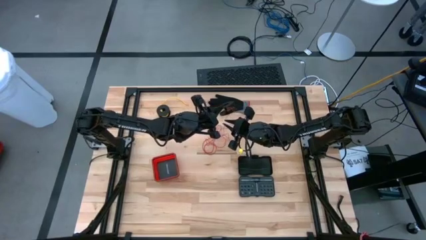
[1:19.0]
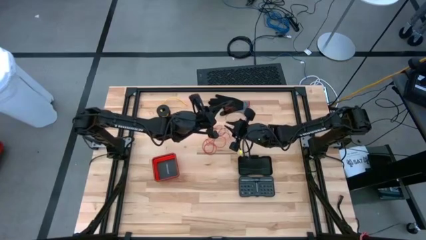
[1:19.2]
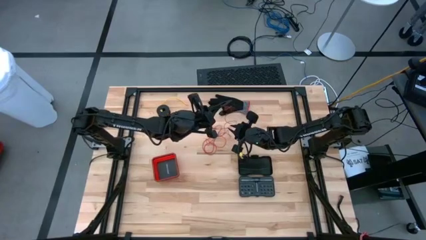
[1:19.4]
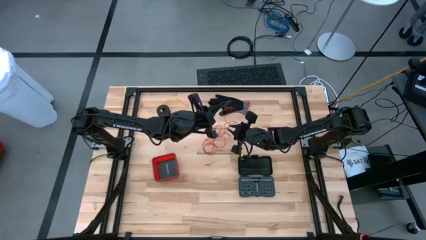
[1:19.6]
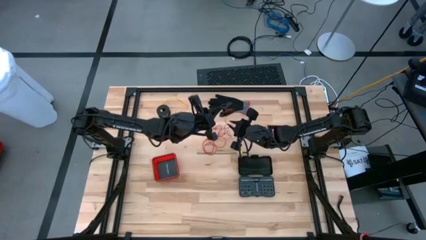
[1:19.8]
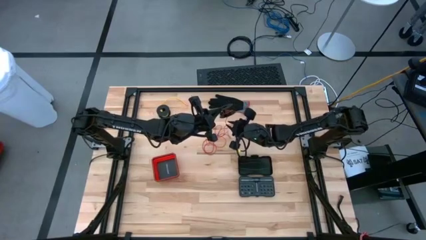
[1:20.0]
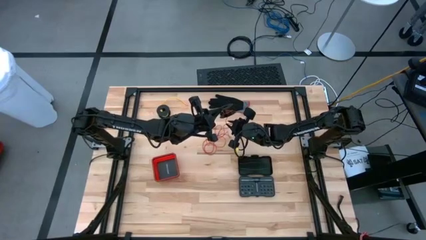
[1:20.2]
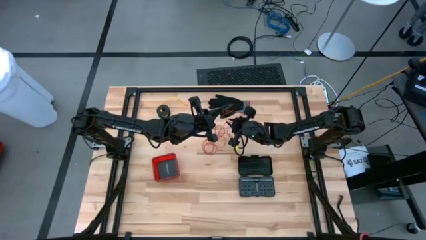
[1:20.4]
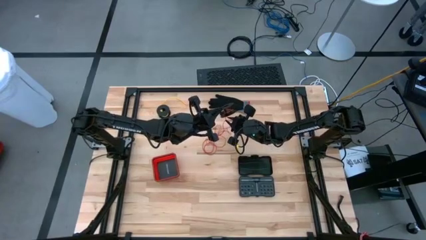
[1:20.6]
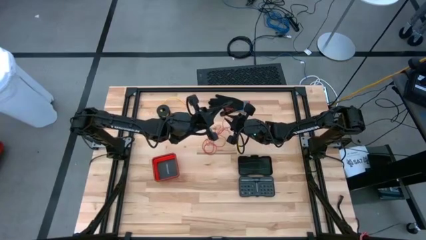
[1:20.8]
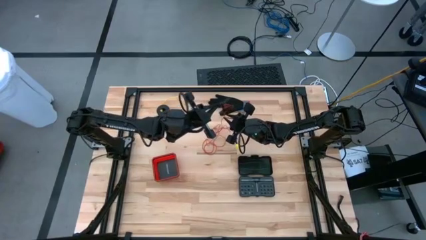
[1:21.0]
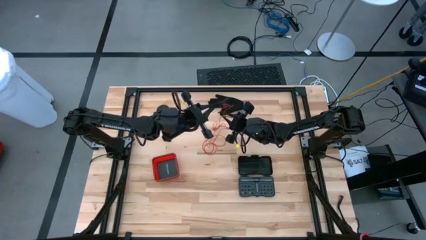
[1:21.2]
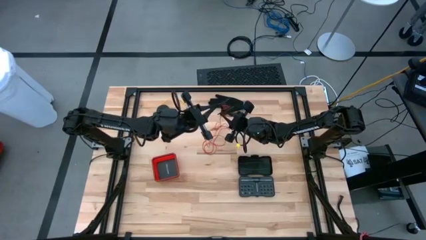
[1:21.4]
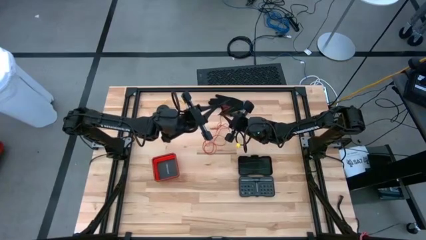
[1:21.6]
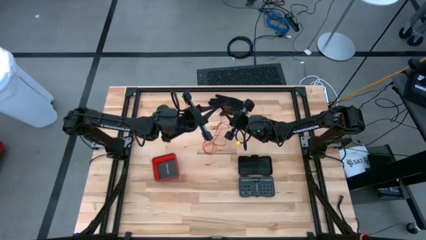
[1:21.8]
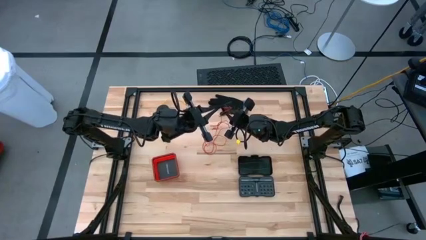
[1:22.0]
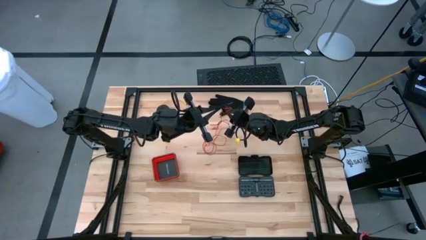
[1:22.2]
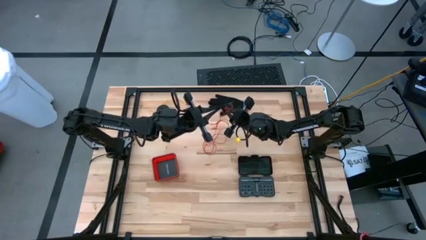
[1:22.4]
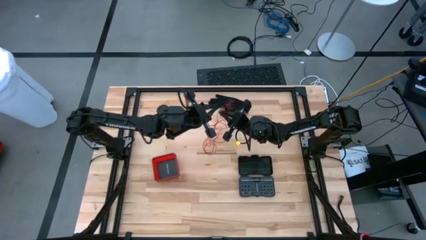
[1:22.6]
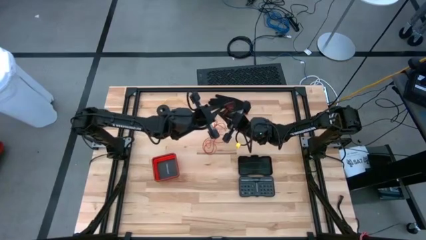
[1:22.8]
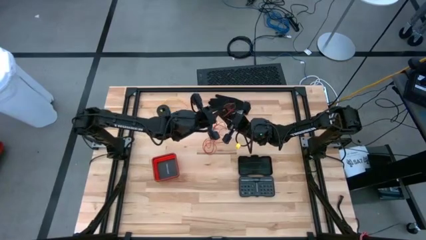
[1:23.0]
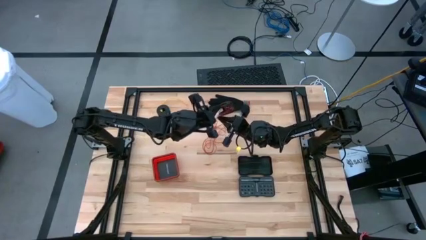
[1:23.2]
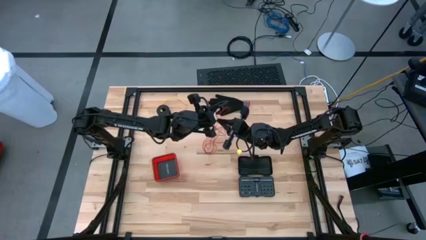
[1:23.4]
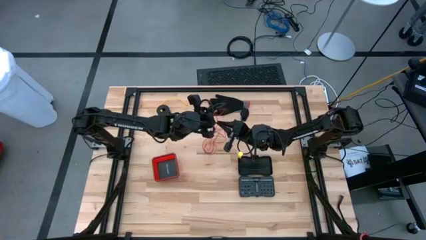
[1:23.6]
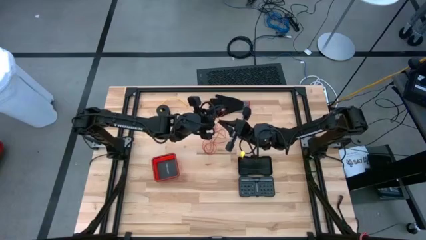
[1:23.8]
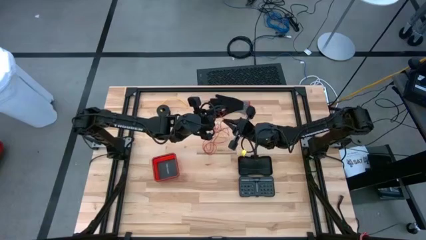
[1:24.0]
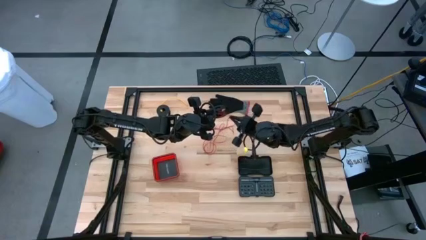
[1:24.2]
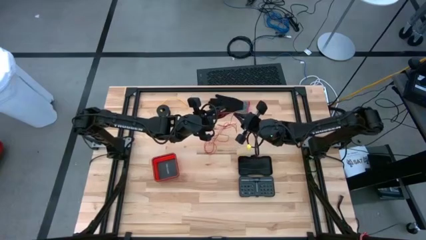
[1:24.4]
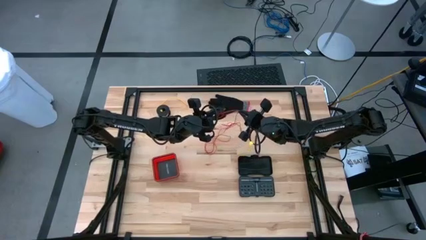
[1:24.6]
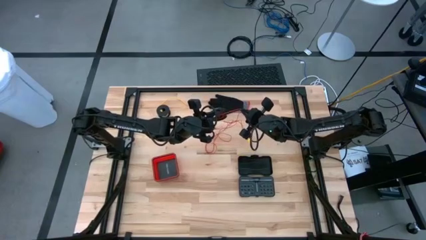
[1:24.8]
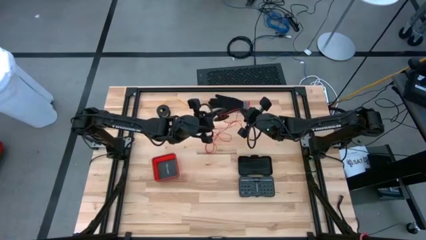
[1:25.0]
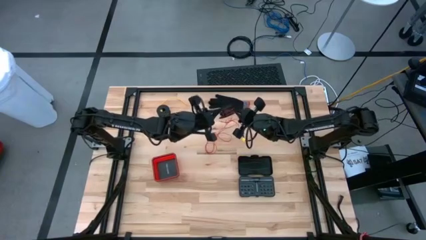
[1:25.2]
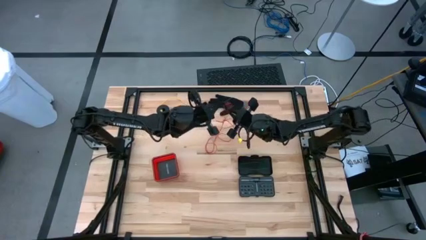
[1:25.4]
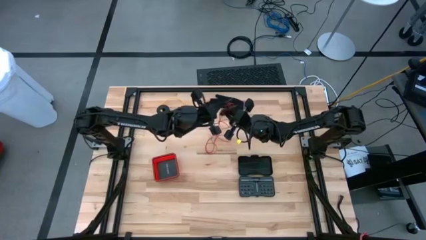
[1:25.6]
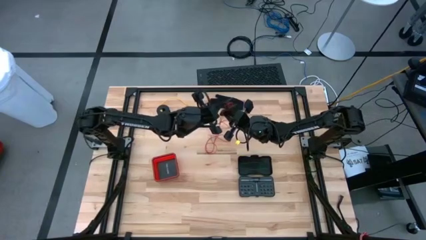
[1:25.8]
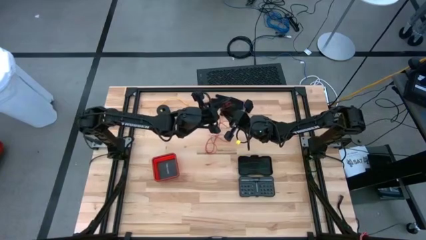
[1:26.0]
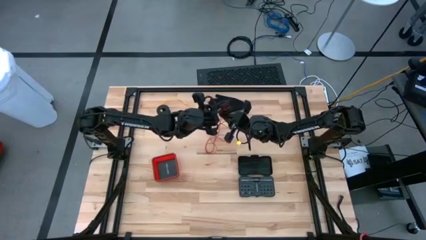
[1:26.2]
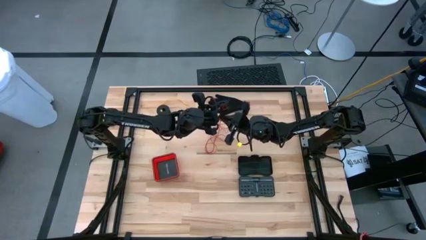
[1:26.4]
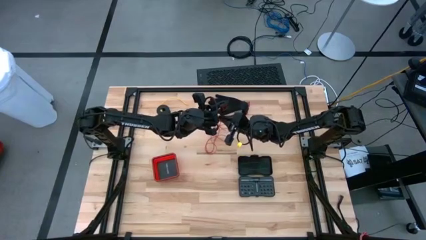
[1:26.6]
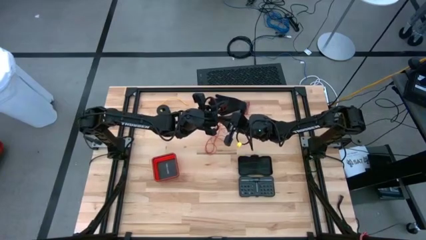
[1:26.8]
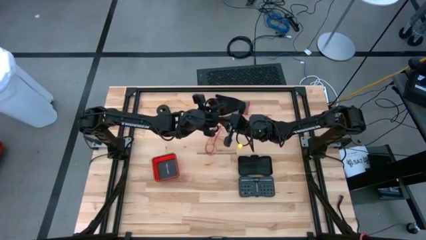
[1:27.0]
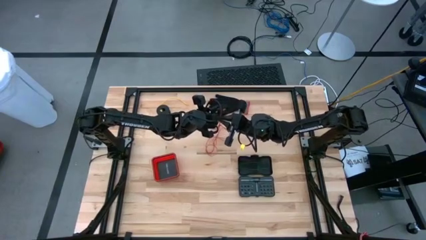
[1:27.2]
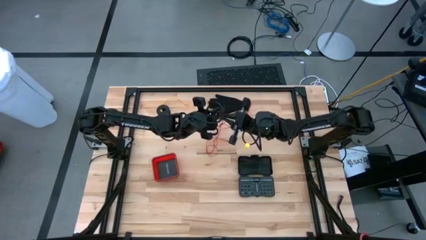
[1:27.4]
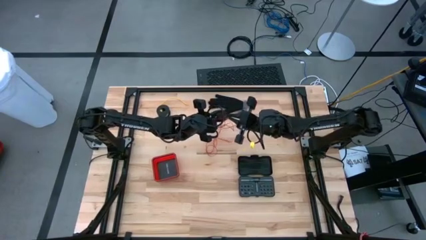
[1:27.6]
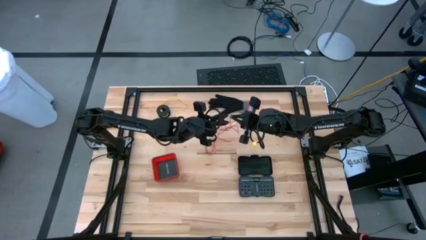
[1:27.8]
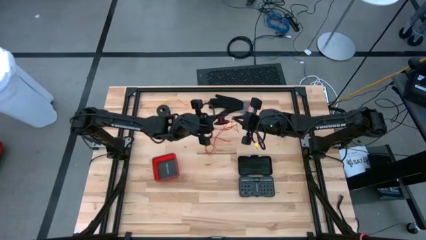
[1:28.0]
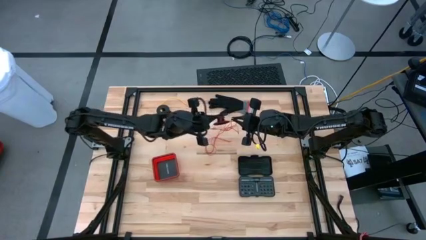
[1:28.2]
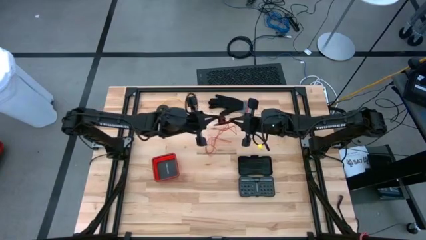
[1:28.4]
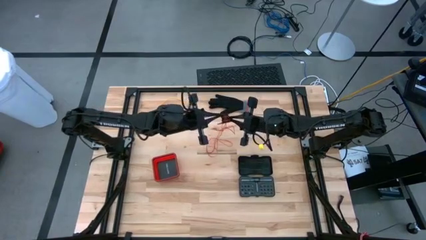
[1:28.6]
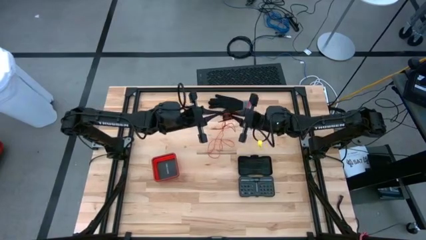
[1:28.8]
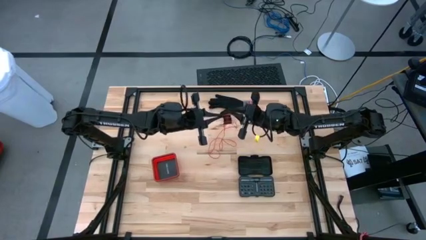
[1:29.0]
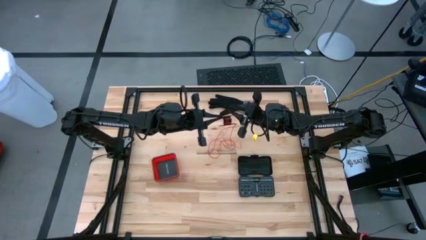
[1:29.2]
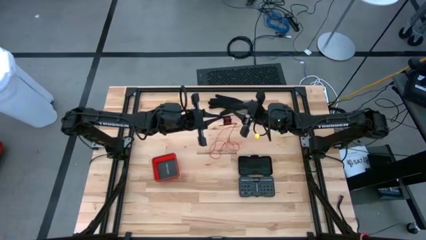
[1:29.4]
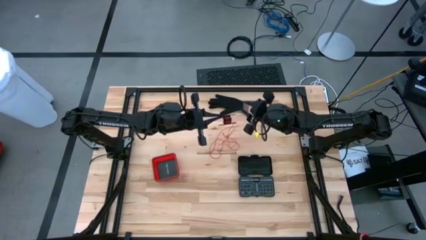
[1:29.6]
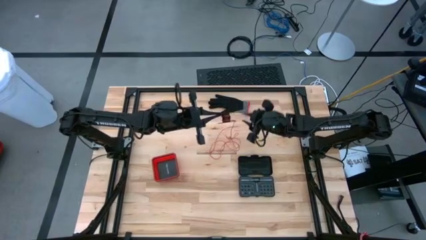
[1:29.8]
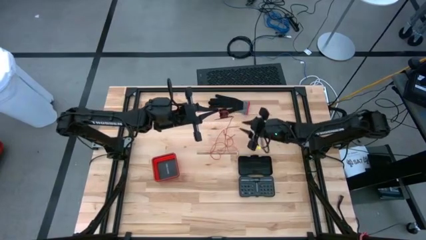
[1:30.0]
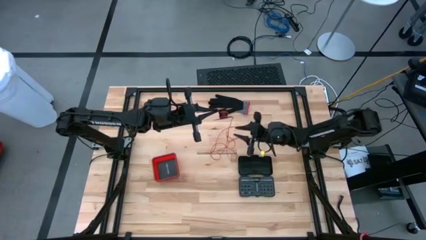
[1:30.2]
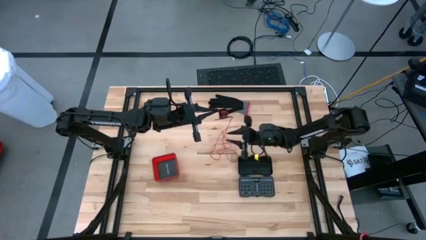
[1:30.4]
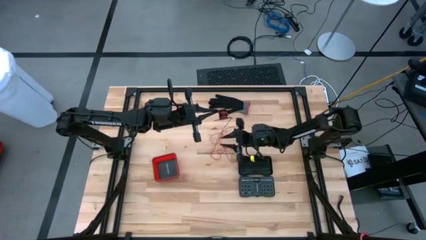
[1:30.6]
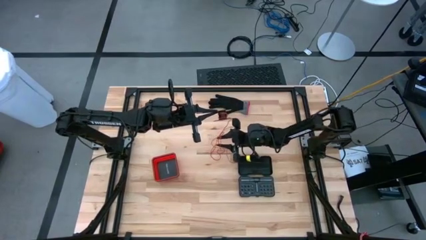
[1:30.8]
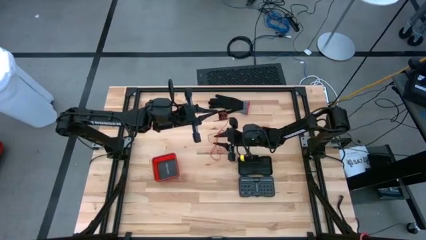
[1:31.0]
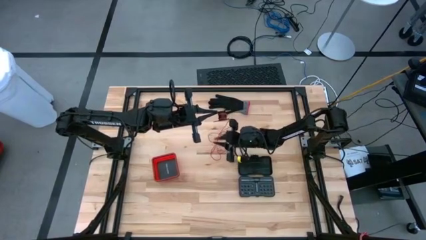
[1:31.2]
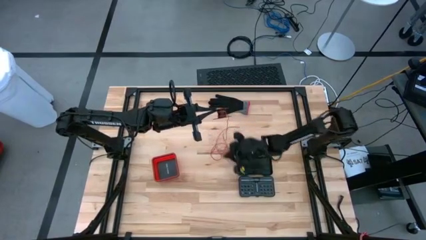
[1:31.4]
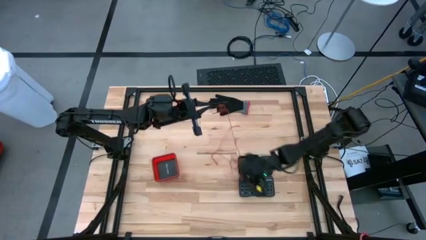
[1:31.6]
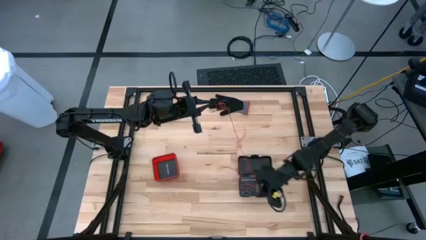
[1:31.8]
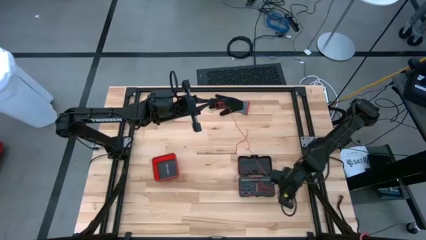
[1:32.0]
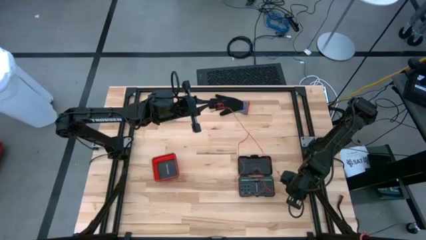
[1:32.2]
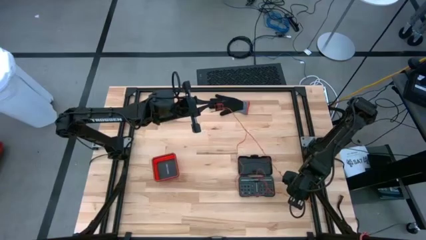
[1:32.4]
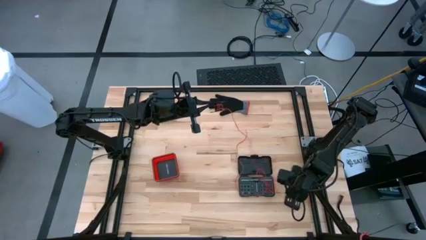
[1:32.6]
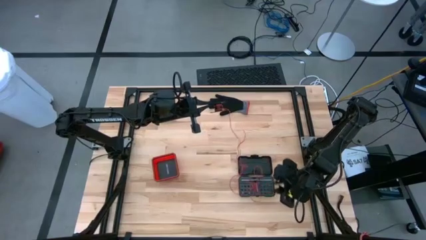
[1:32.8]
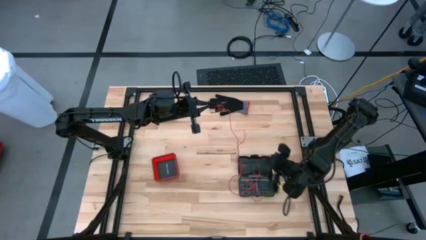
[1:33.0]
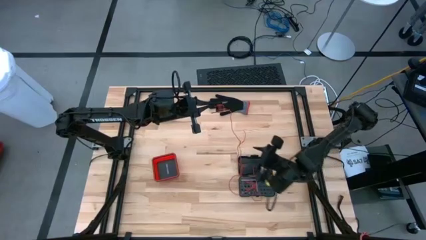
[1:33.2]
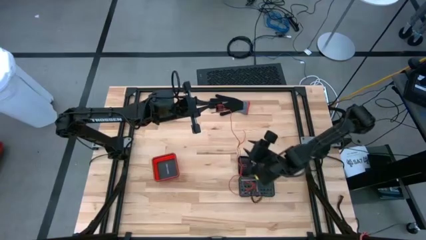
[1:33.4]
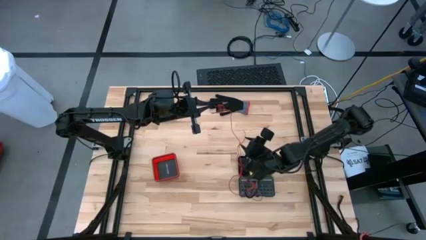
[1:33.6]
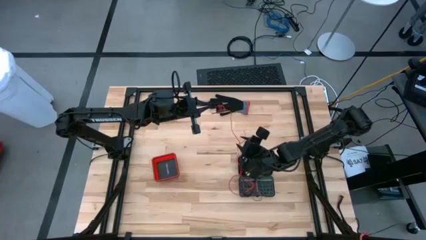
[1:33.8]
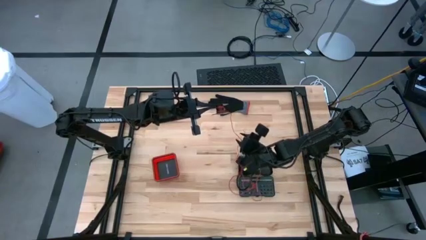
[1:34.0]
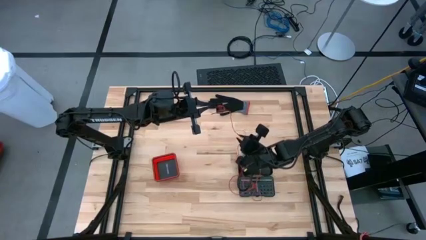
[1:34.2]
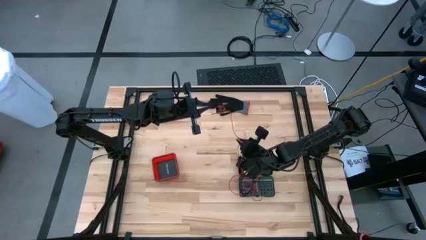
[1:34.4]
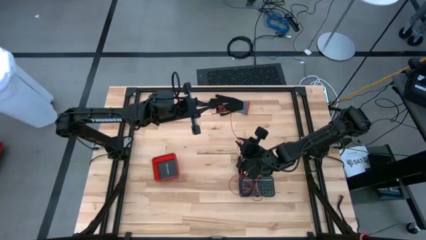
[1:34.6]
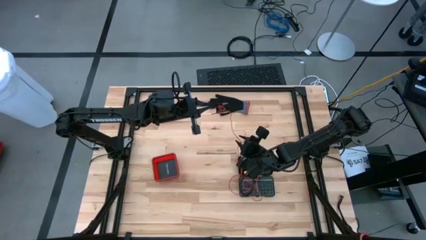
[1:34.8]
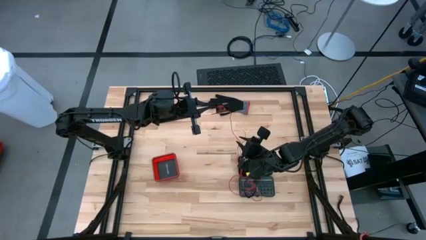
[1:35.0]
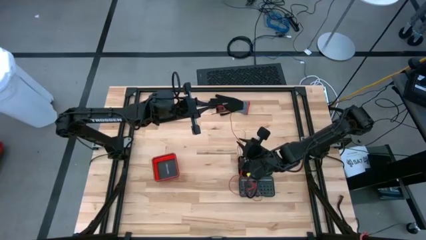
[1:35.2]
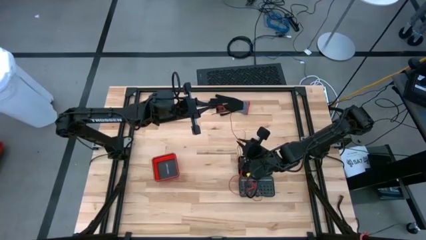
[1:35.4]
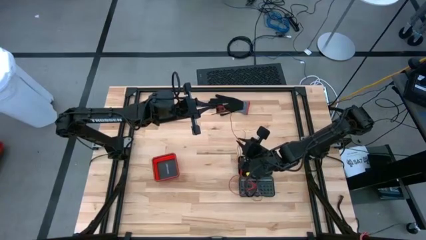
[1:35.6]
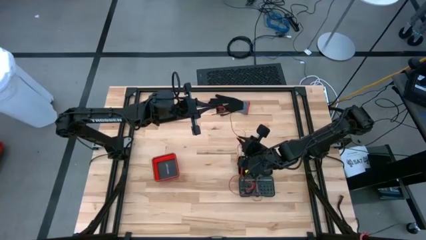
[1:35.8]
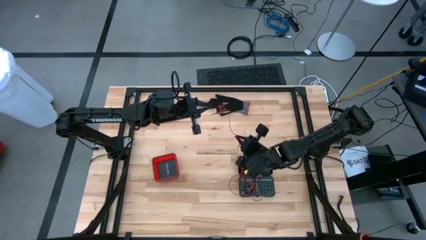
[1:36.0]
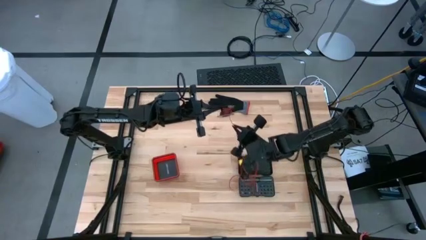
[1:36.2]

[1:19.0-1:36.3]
Task: Coil cords
Coil the red wire onto the spool
